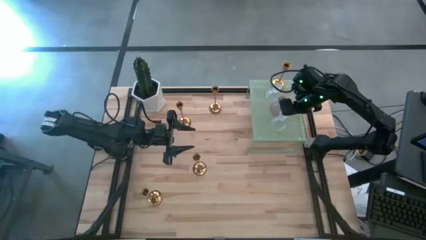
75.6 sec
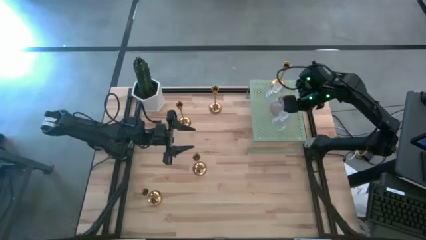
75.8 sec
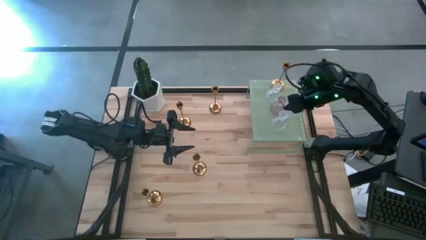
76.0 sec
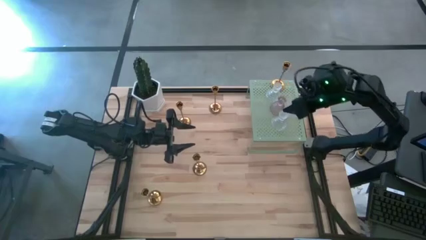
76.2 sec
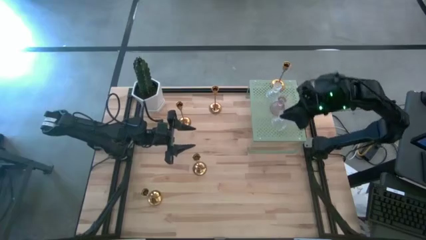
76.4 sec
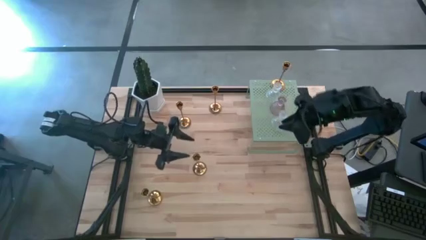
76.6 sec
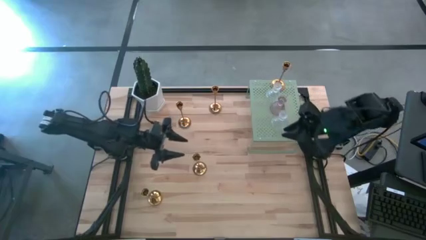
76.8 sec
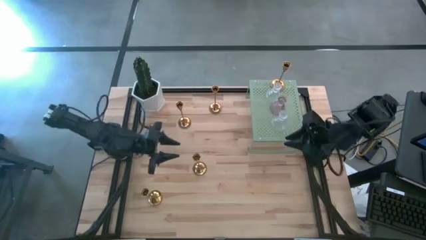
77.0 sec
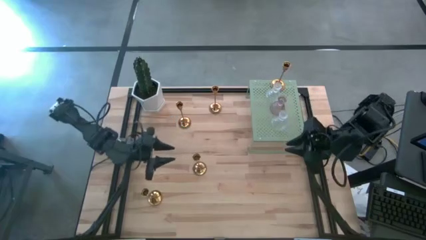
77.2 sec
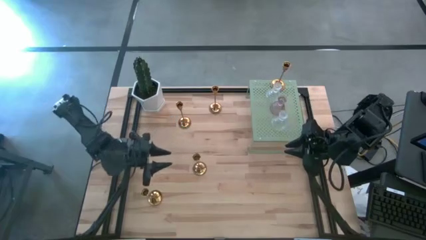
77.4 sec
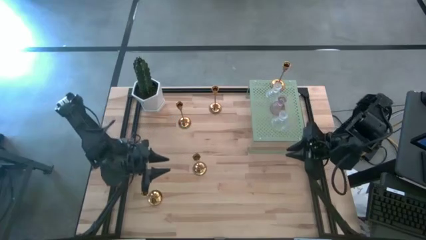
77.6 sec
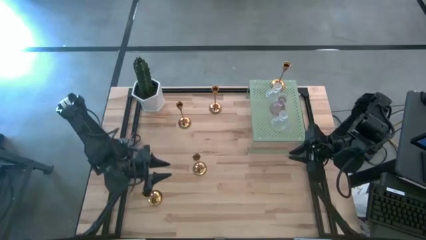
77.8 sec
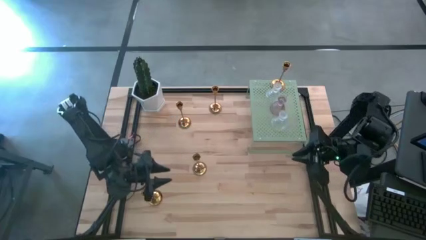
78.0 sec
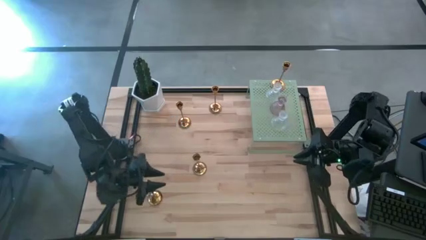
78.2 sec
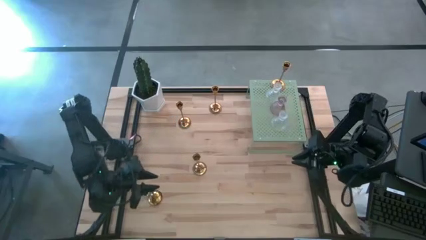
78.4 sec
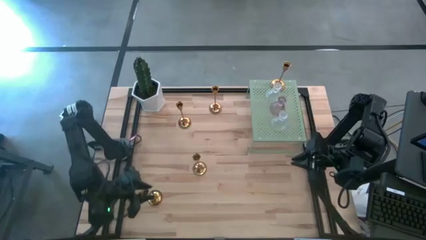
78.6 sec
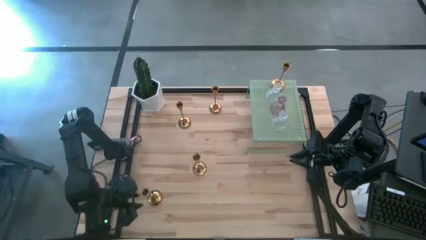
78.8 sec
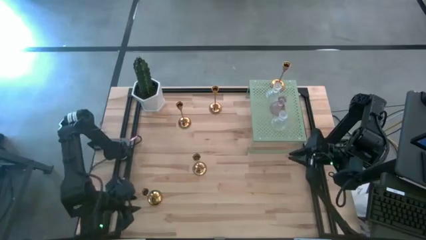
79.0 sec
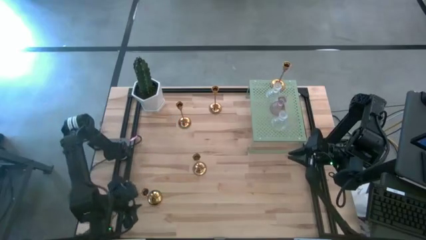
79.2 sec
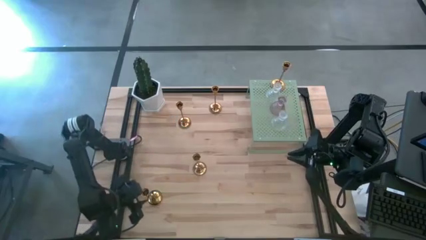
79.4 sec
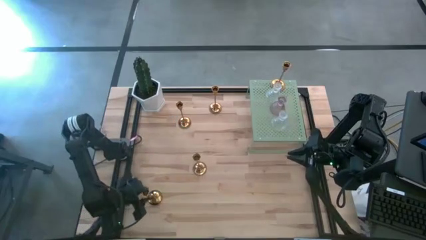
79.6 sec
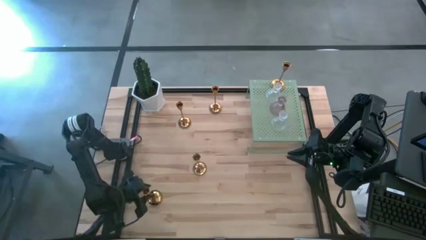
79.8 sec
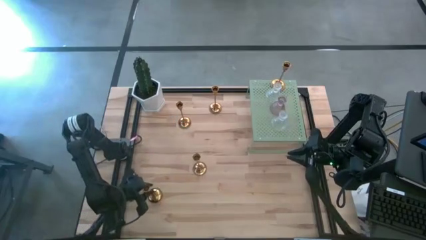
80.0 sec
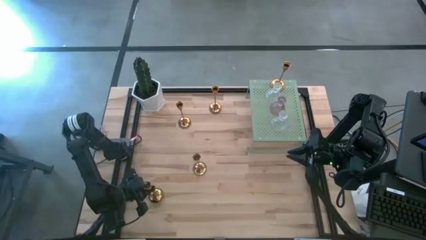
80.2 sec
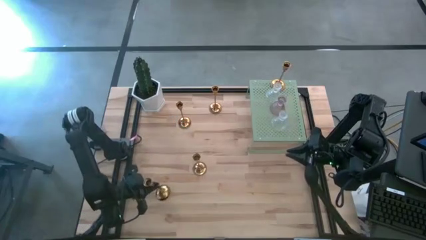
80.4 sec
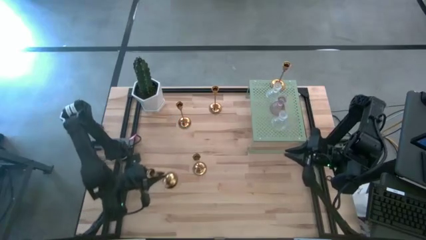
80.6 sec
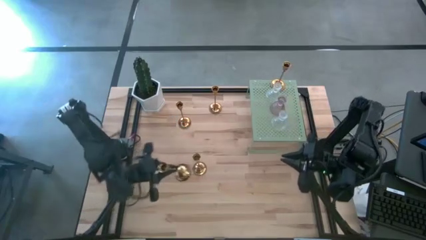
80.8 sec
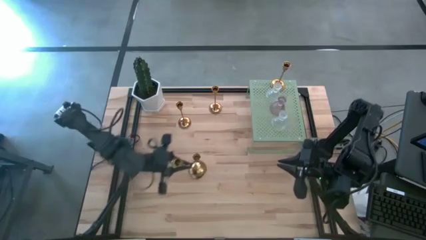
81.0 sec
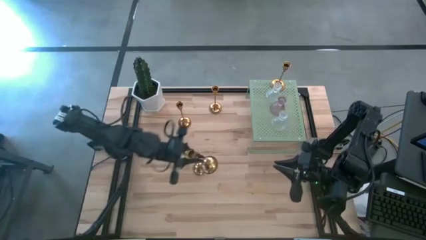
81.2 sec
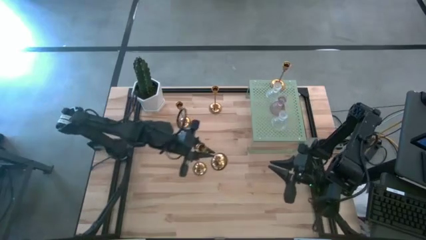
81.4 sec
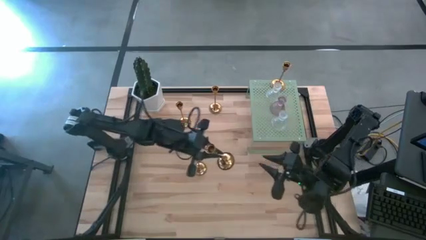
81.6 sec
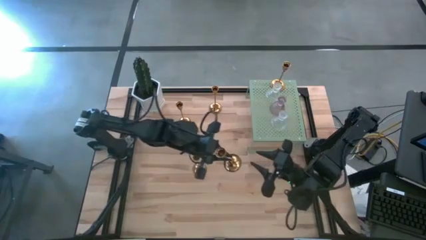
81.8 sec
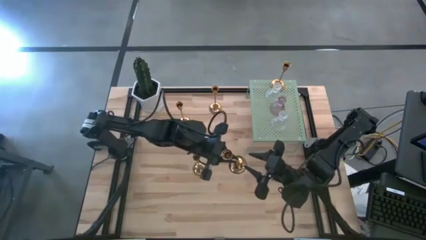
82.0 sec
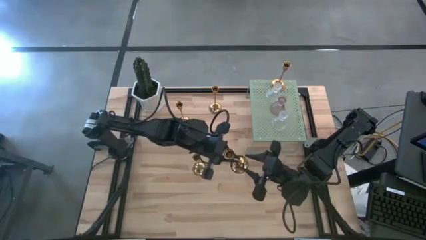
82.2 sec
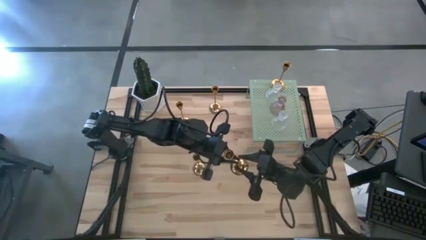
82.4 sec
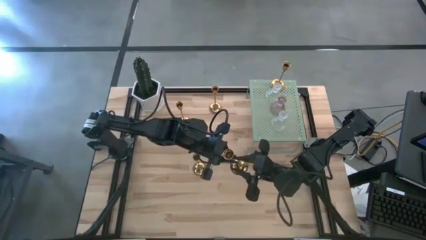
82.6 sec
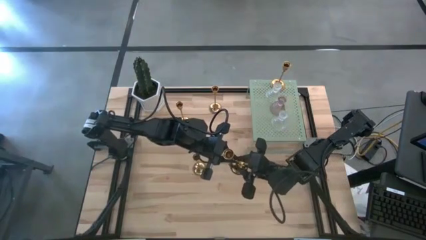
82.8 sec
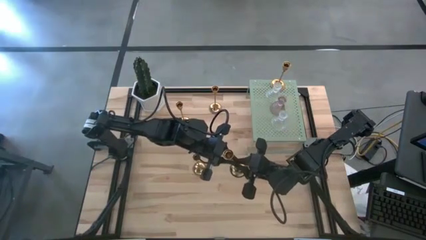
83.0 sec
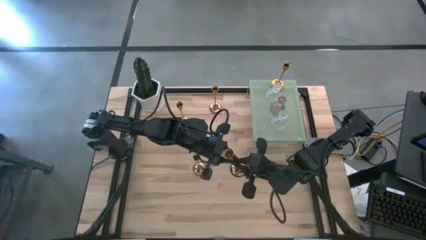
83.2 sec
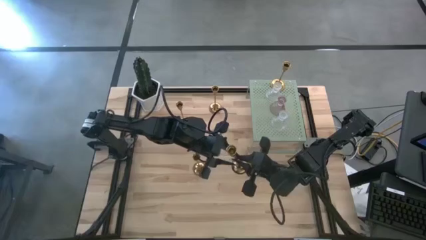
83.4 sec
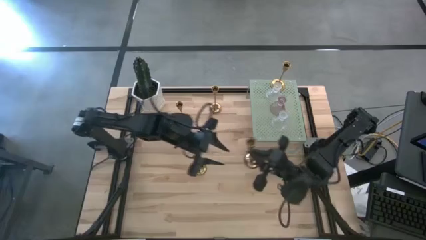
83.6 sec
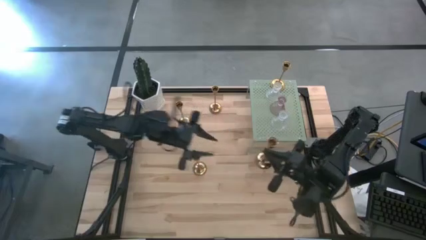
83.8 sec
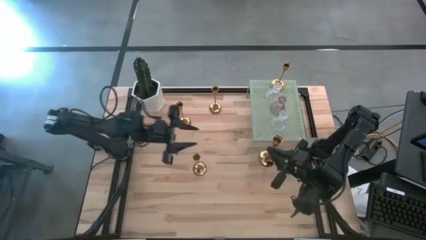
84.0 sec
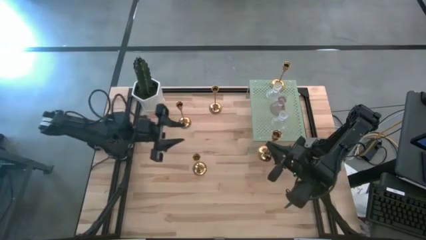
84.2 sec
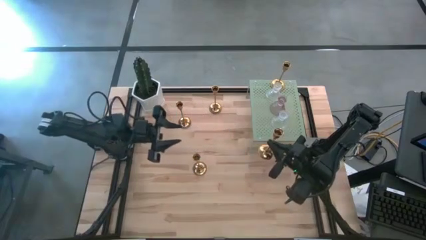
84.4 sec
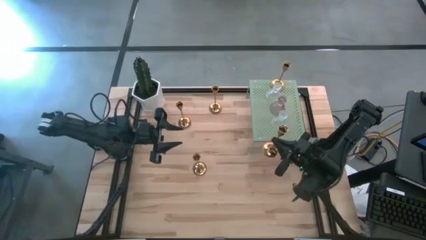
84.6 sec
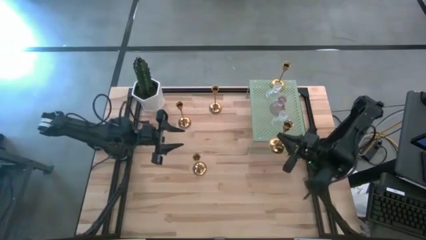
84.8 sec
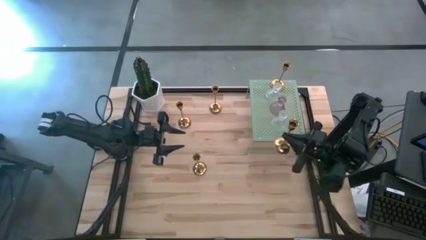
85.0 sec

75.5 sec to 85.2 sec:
Task: Pick & Place candle stick holders
Put the gold candle holder on the shelf

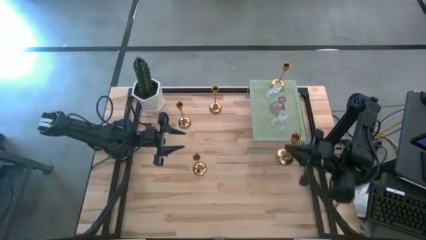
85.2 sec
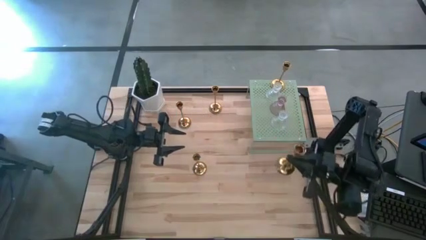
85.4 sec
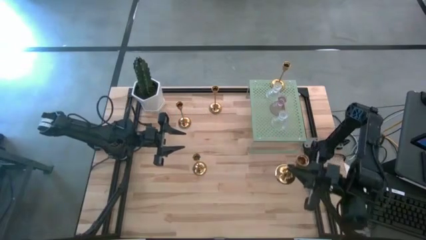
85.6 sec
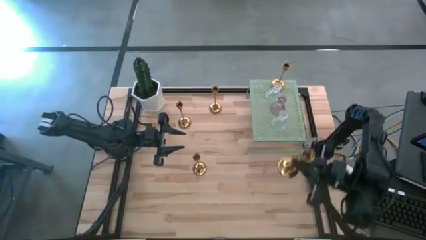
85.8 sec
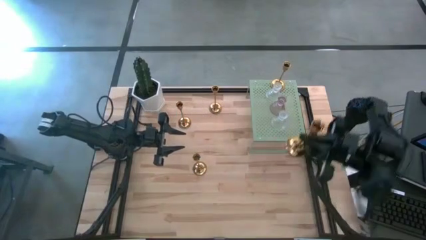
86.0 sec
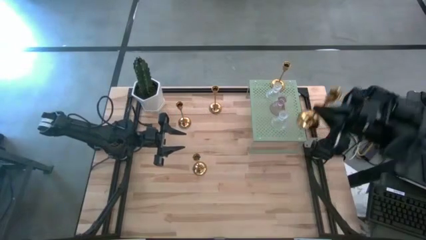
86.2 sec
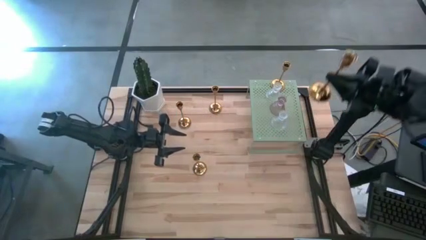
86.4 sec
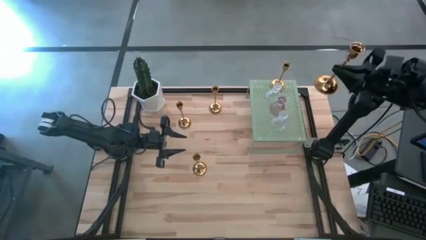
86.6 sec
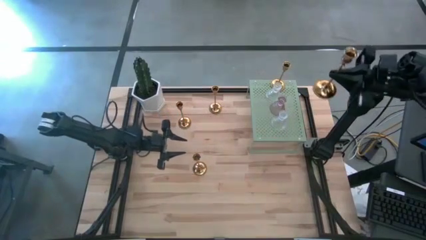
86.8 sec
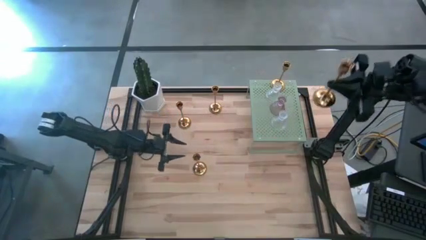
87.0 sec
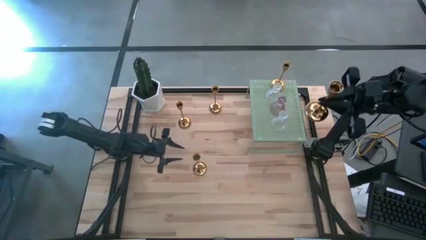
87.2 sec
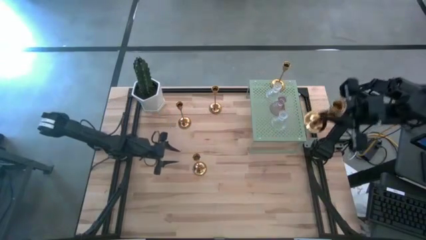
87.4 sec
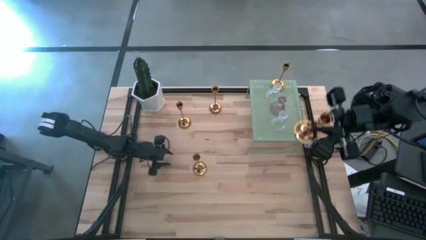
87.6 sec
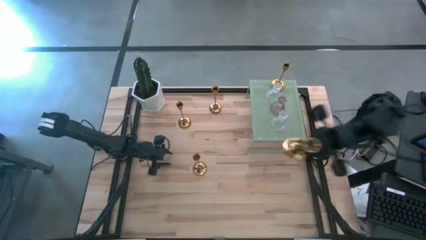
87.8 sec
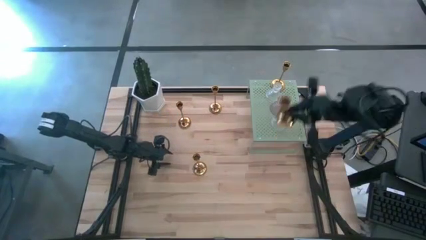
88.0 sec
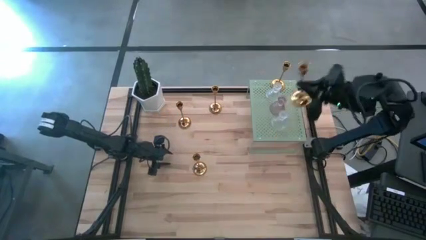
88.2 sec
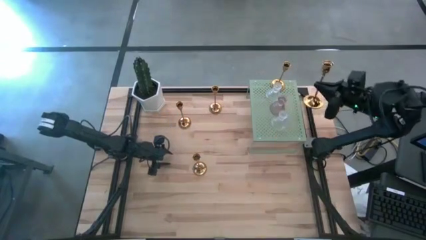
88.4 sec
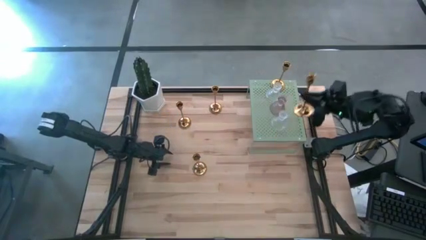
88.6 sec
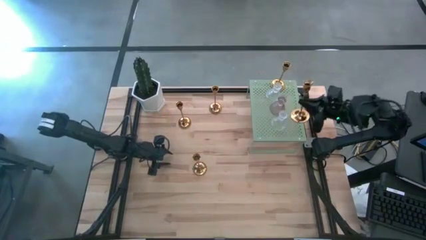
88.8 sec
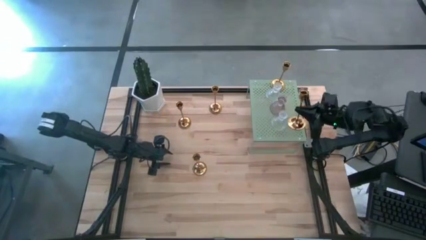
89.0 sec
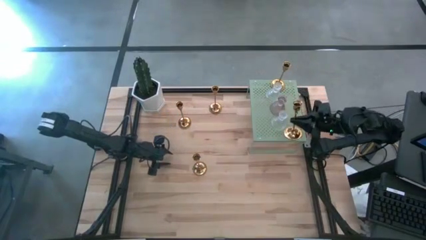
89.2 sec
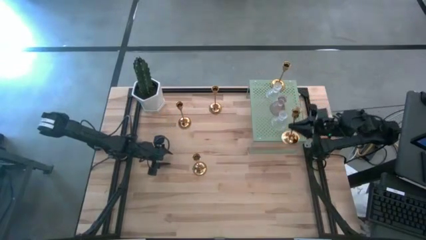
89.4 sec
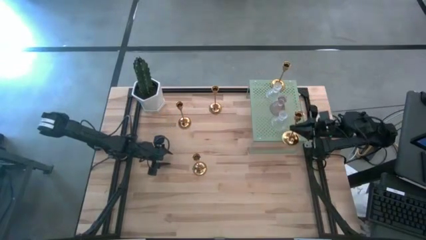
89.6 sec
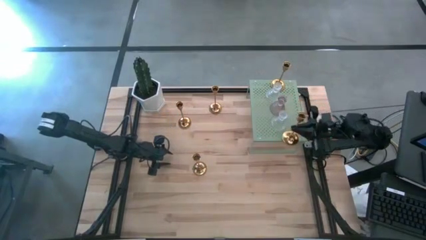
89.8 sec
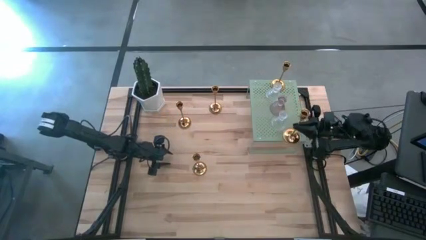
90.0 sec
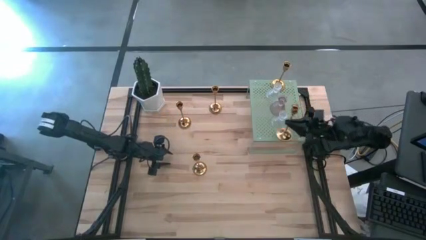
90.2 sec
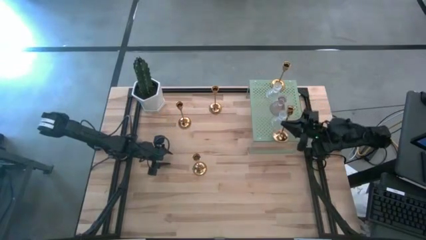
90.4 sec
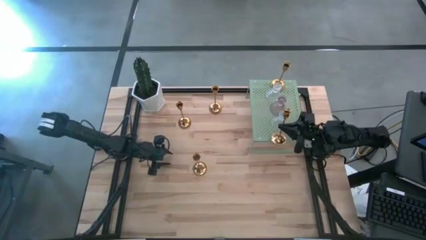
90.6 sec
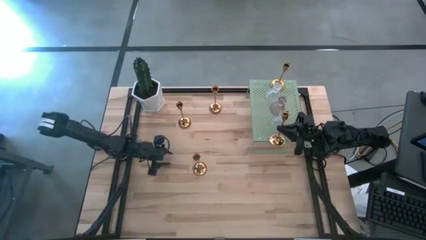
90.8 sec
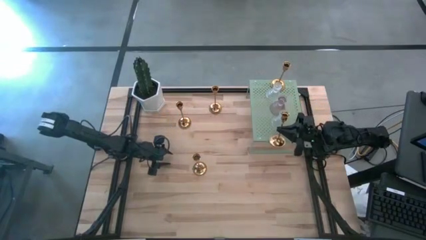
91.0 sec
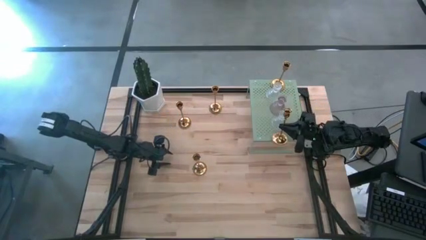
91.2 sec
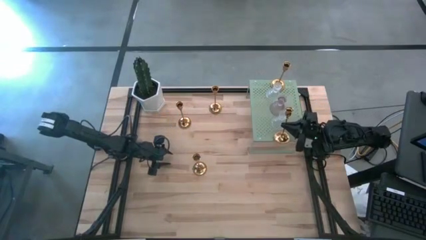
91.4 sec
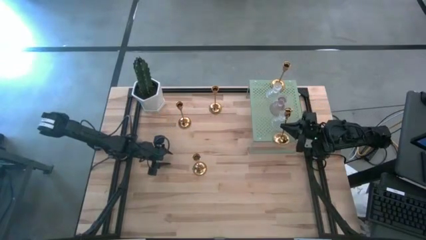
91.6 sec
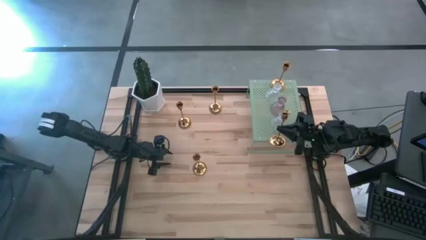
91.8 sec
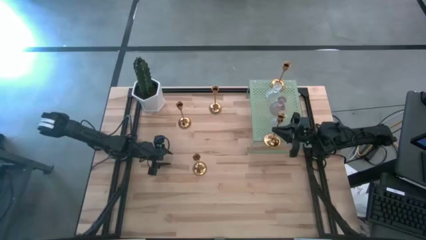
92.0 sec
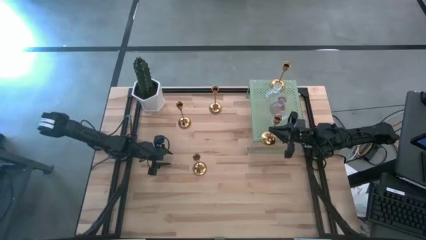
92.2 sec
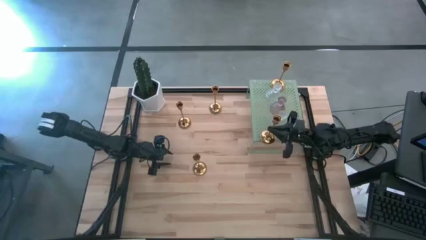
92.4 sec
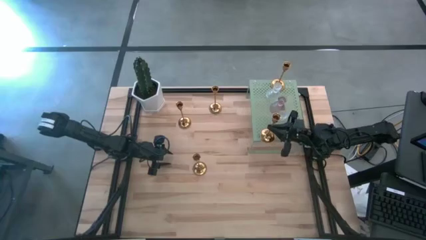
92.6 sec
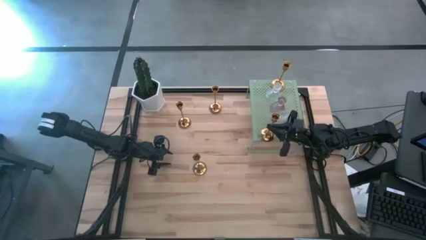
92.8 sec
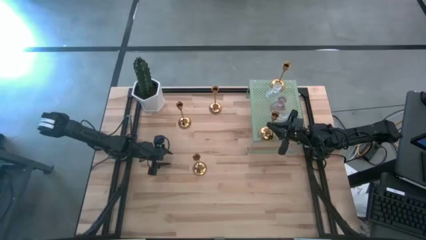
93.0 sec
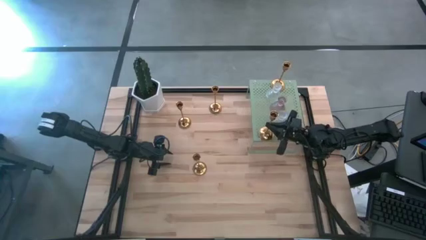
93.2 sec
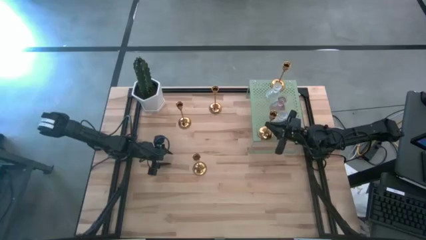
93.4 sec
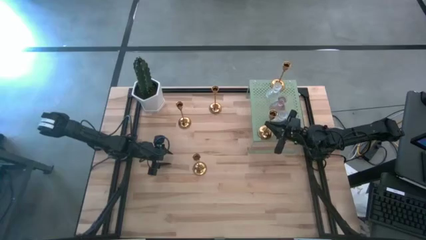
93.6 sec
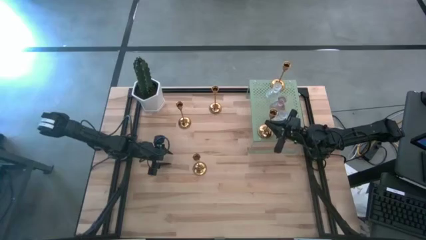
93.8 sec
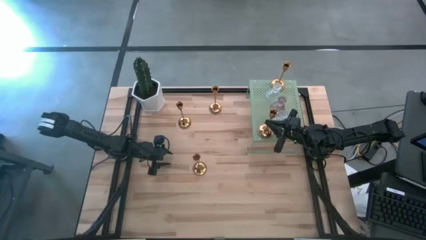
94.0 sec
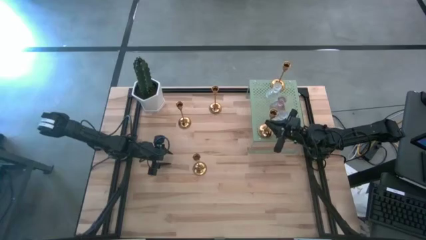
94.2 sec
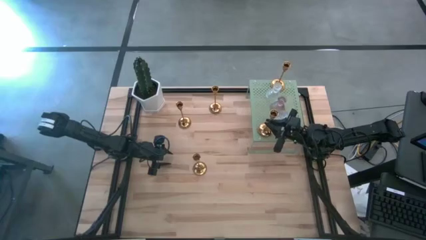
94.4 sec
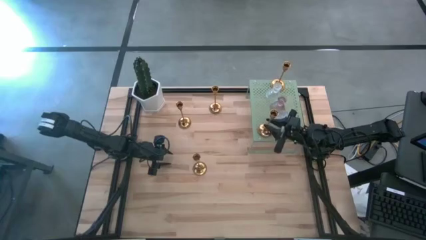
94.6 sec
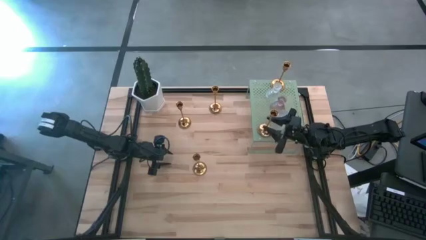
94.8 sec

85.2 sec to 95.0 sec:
Put the gold candle holder on the shelf
